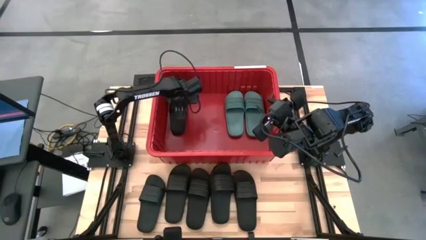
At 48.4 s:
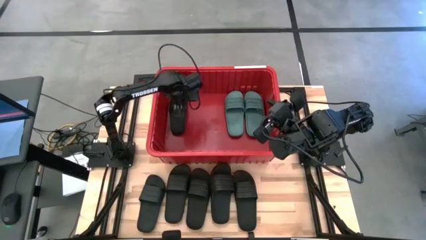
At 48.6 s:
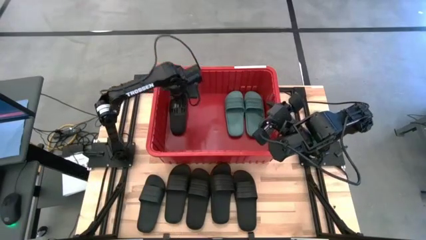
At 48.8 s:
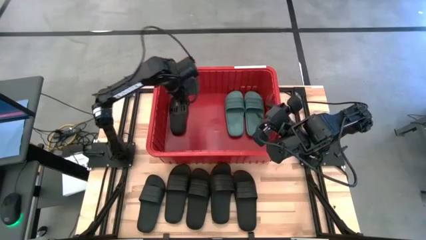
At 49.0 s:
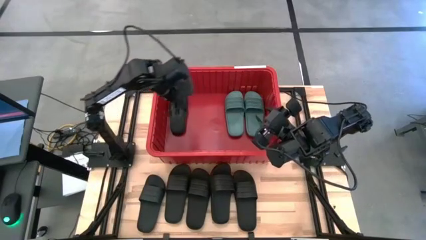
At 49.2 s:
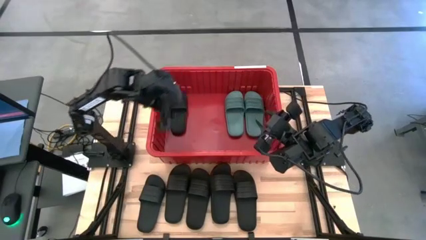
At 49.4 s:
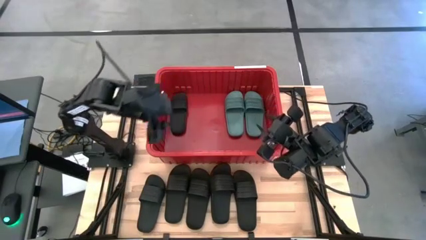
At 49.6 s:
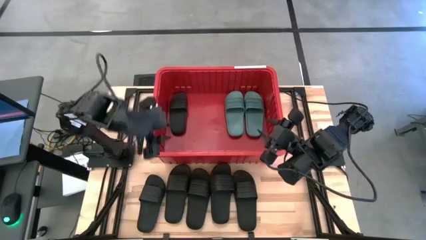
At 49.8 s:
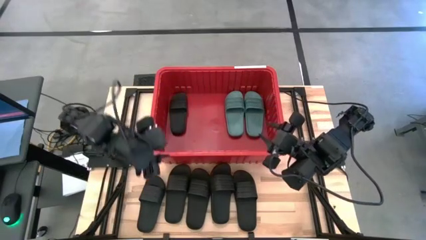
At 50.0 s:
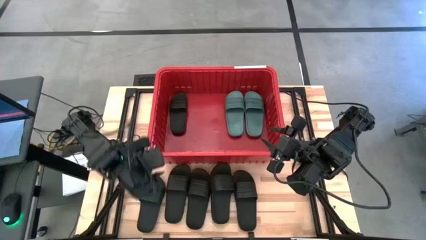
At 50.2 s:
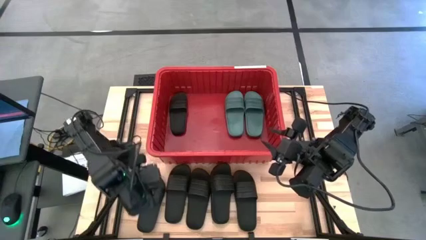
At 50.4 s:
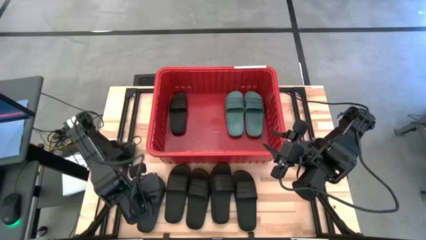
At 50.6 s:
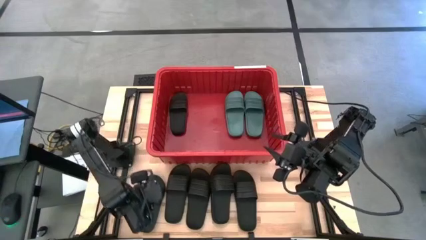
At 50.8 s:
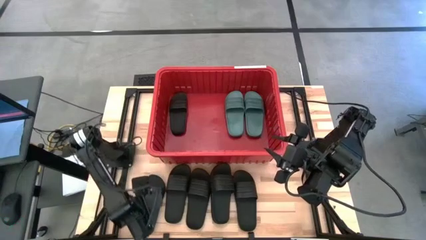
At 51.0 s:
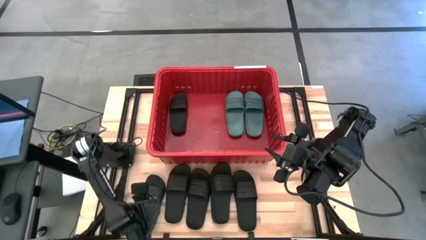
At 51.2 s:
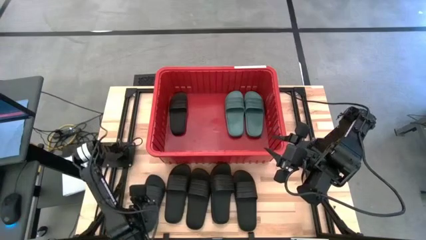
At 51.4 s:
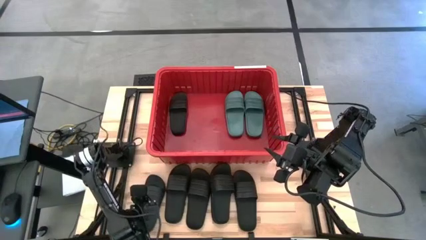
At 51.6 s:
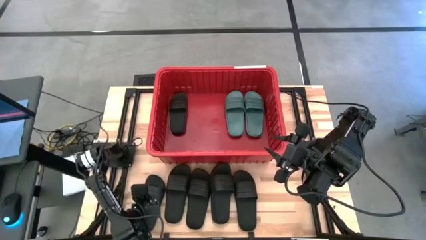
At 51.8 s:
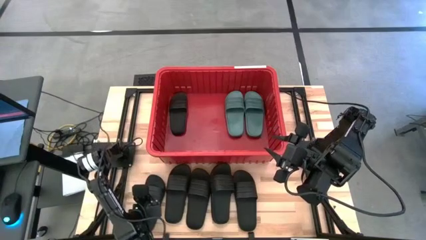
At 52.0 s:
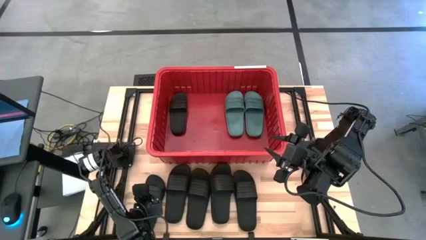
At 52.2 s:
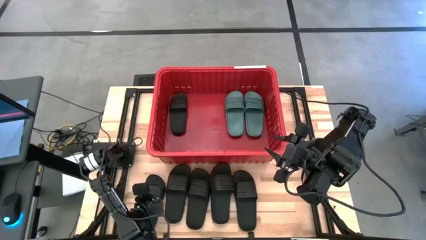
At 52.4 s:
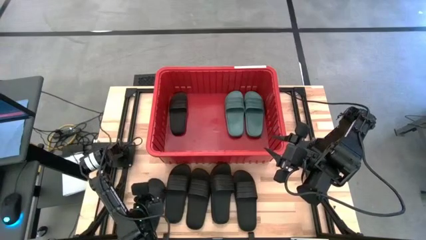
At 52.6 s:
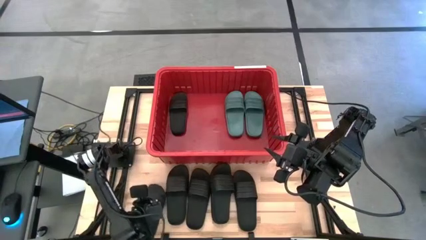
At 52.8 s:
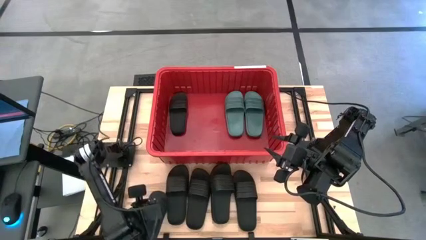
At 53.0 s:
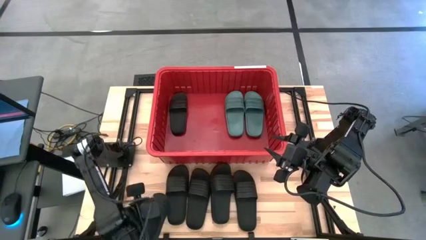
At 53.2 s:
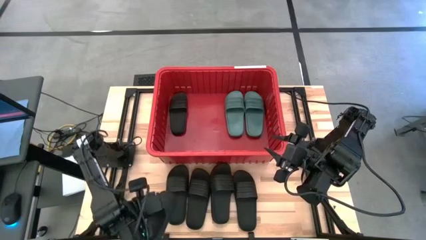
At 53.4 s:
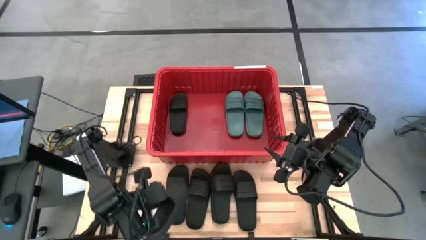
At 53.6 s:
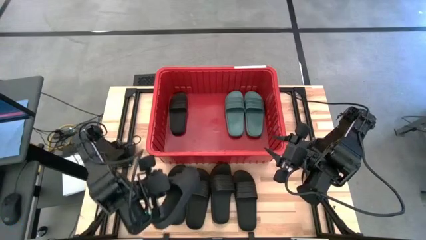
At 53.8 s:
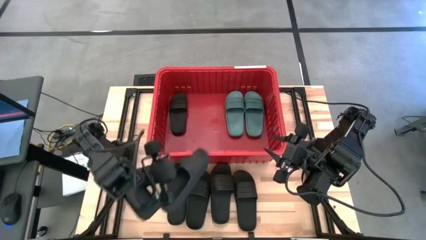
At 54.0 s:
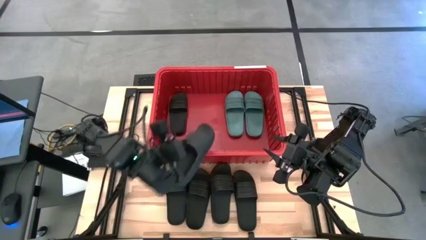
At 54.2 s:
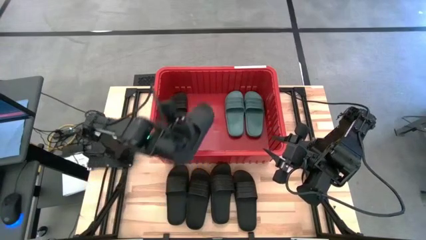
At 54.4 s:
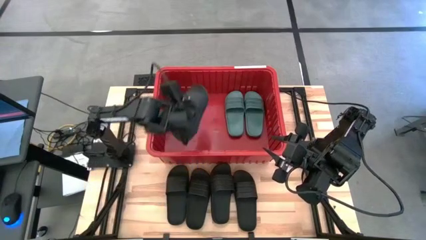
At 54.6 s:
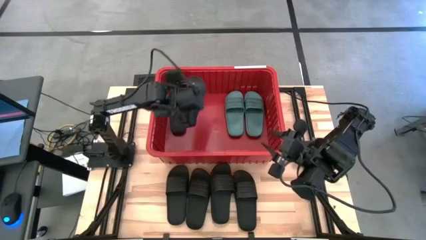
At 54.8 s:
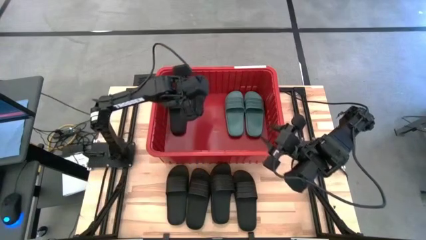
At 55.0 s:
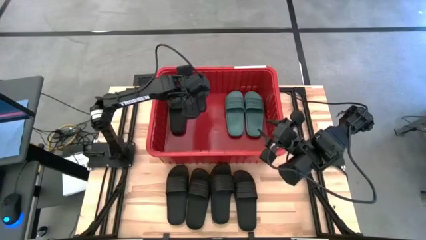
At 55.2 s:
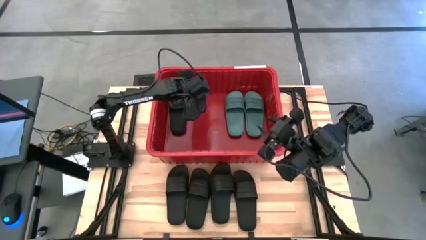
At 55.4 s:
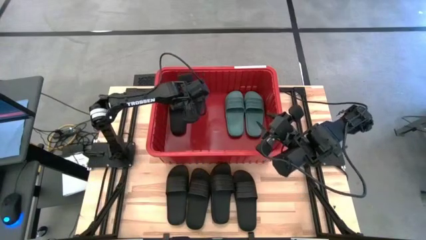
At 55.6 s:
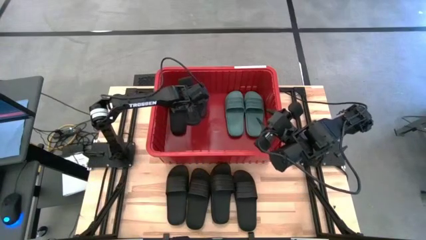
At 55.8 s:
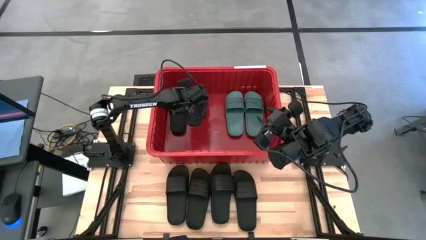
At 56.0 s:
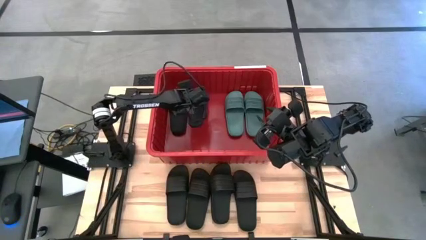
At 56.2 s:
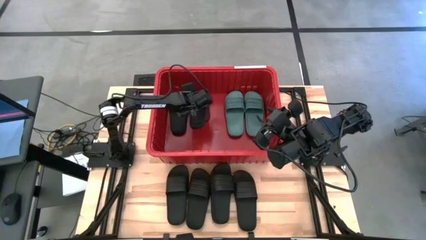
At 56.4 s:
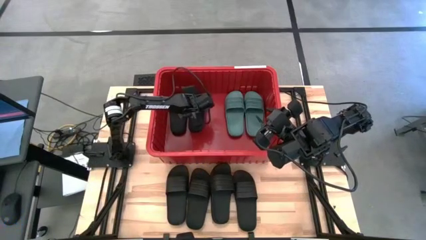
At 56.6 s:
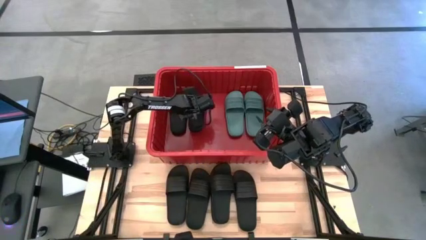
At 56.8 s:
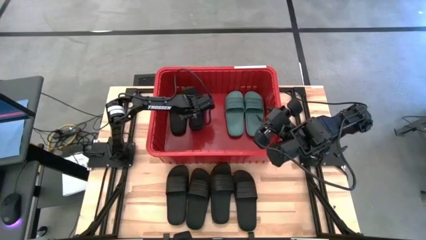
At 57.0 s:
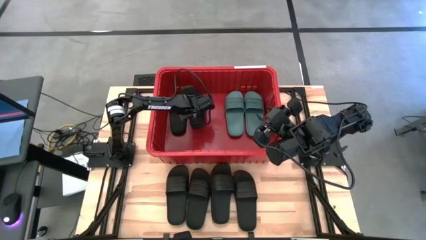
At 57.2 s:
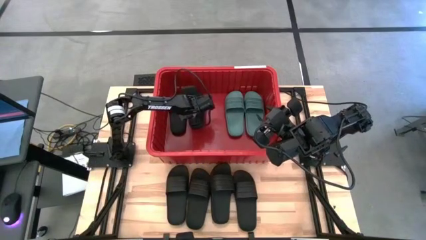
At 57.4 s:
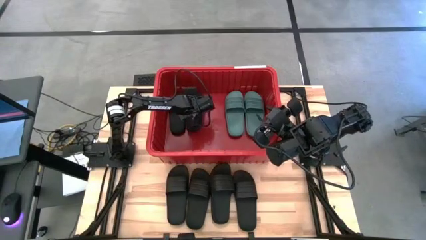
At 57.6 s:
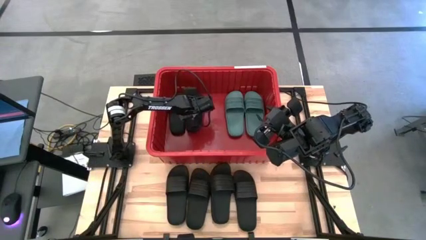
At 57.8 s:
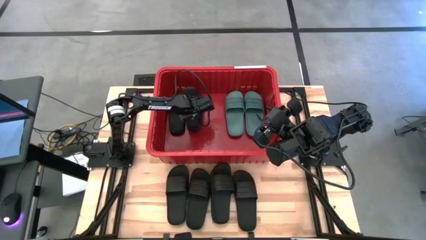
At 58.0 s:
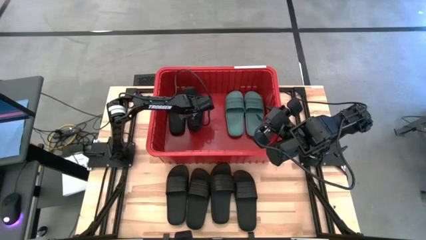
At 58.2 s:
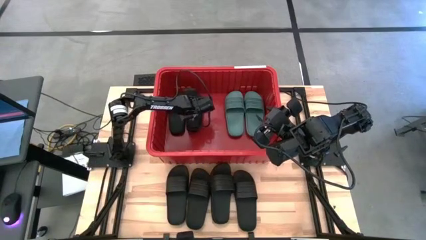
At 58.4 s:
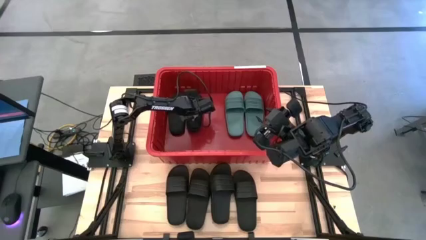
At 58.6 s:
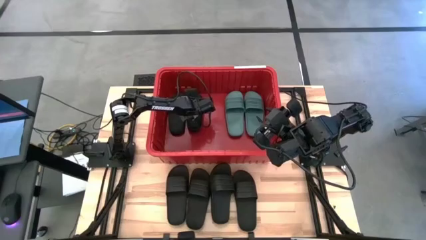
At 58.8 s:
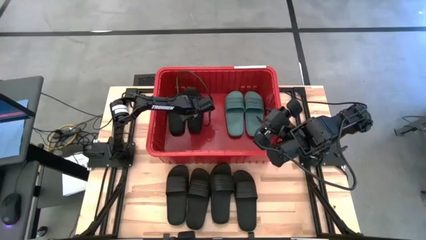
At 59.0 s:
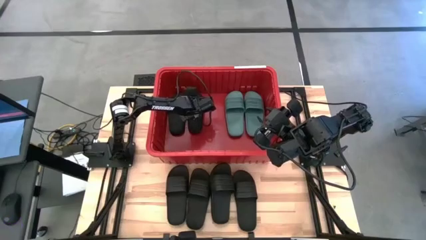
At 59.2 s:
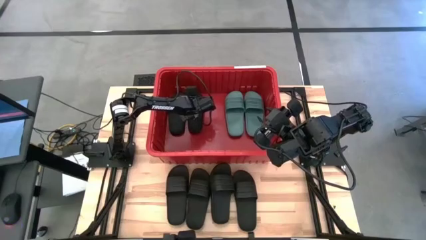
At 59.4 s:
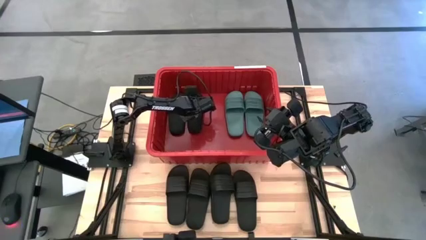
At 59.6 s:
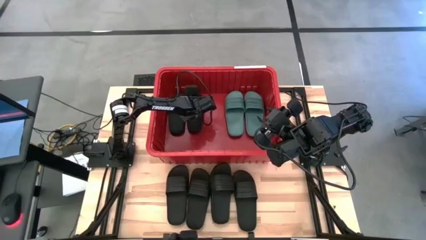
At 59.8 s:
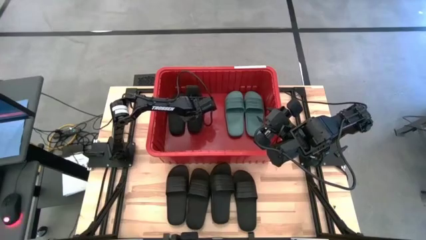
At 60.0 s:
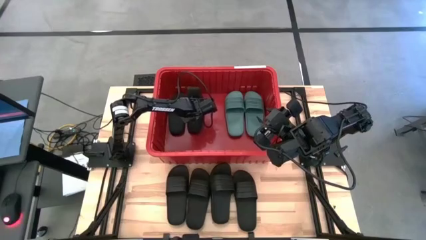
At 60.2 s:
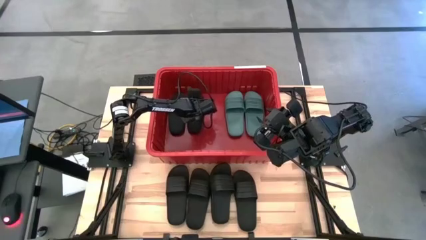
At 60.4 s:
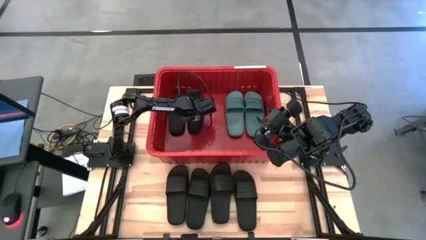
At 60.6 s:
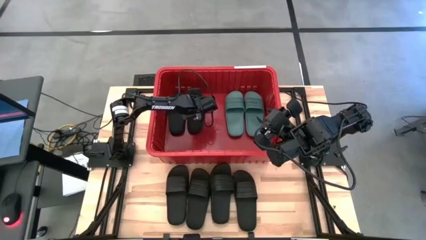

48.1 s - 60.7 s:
Task: Pick and place slides into bin
Put the black slipper into the red organizer bin

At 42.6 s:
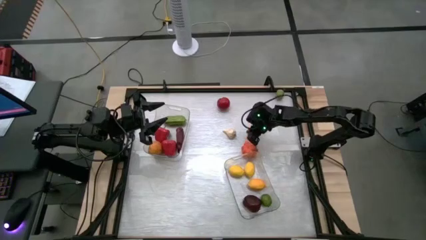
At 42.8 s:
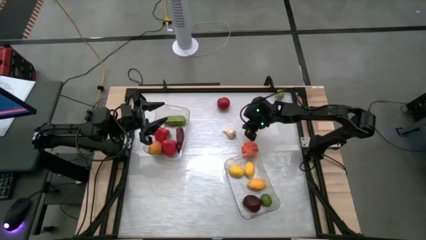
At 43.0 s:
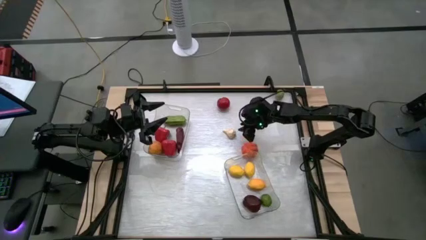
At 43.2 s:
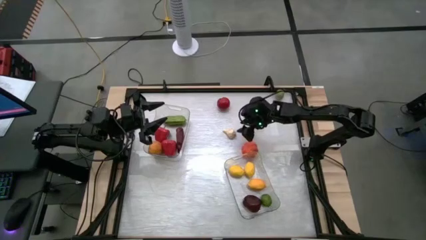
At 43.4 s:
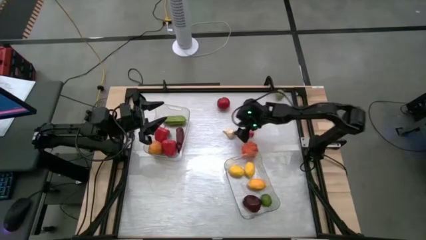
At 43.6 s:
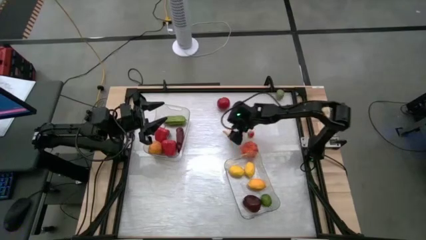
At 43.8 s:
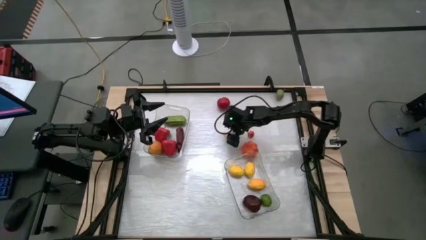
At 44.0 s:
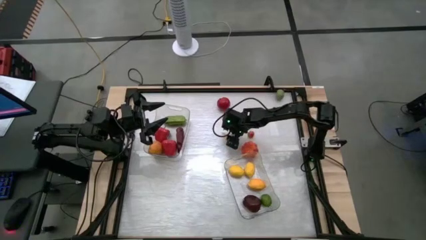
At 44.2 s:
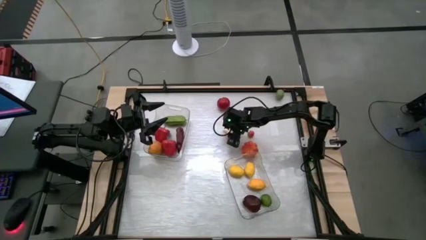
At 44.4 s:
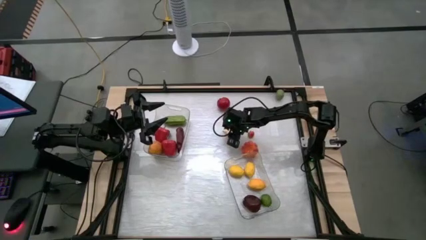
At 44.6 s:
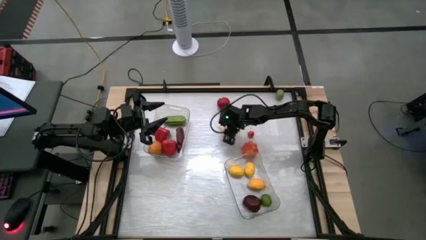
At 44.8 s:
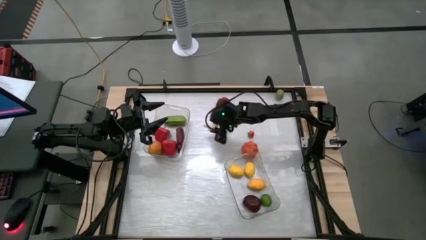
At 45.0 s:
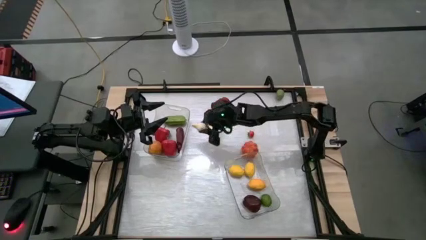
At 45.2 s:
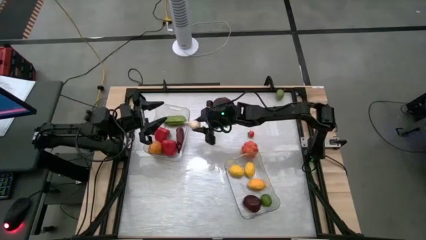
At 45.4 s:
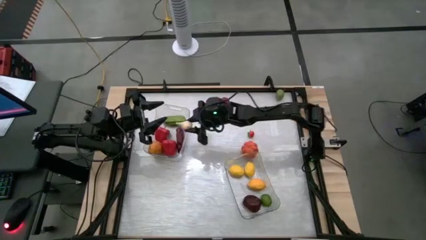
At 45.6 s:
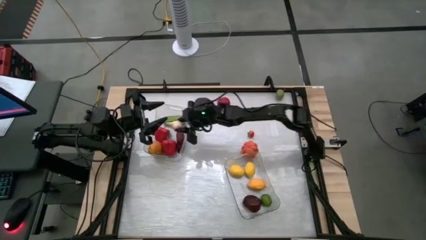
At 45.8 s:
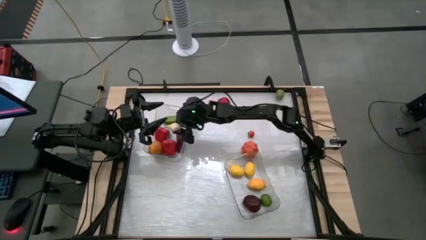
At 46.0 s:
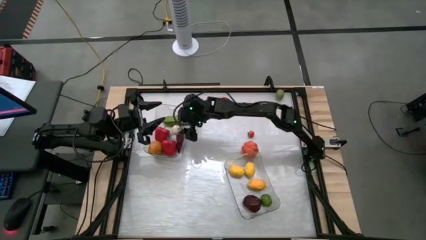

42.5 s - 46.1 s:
Task: Sort produce into baskets
Put the white garlic into the left transparent bin
